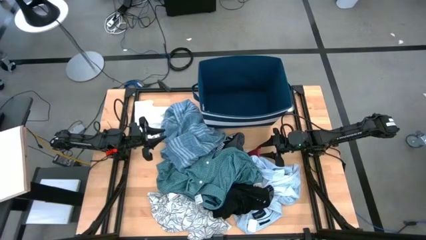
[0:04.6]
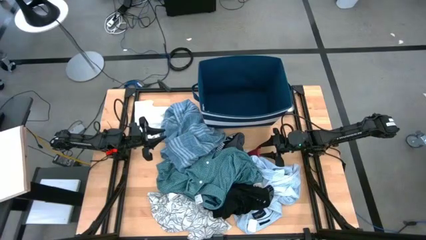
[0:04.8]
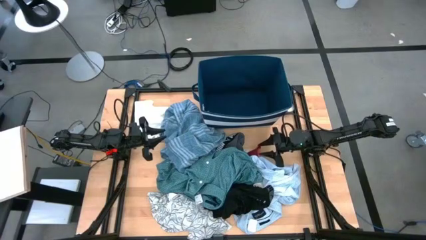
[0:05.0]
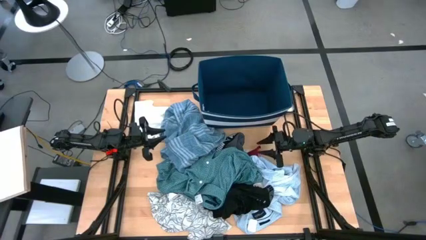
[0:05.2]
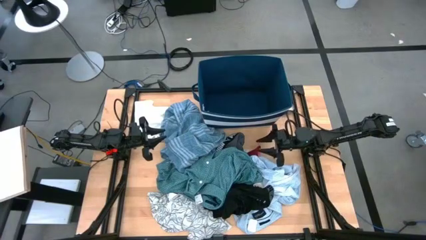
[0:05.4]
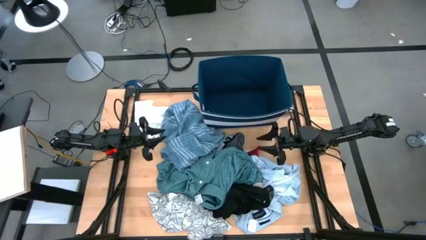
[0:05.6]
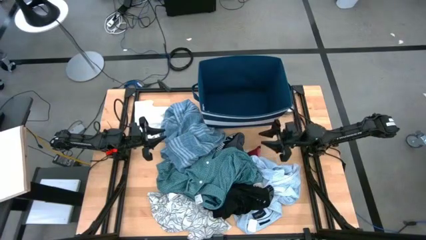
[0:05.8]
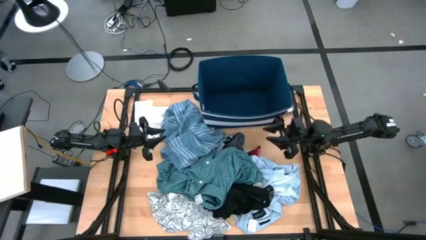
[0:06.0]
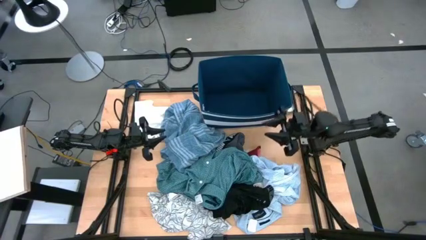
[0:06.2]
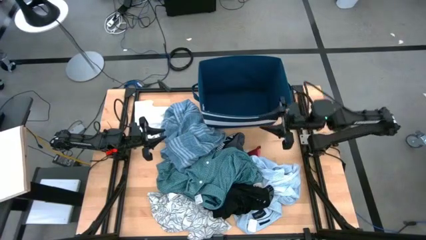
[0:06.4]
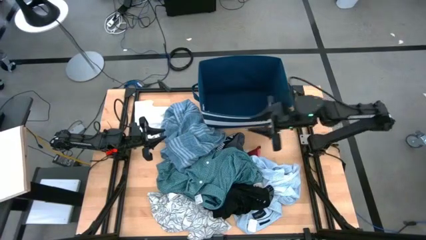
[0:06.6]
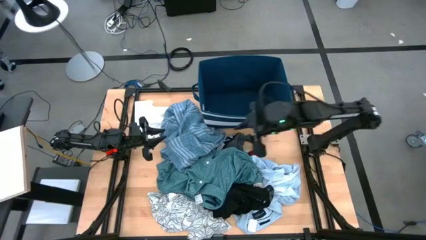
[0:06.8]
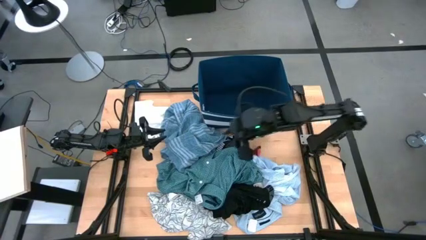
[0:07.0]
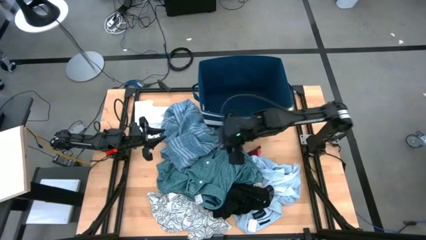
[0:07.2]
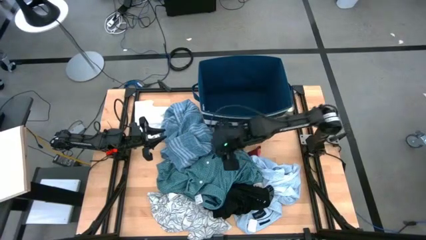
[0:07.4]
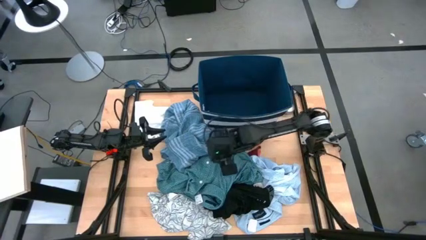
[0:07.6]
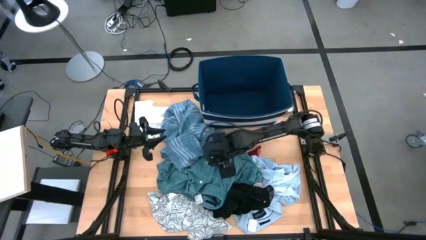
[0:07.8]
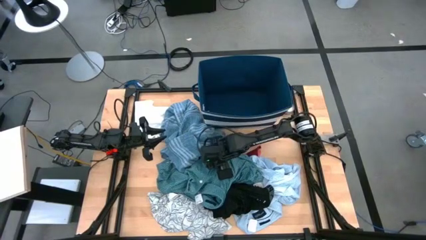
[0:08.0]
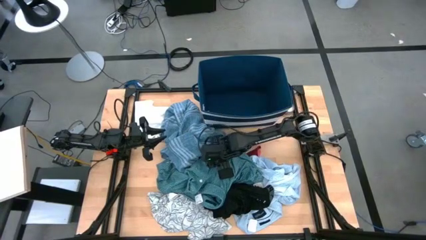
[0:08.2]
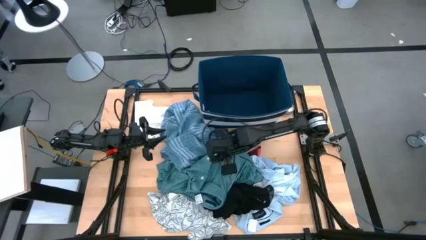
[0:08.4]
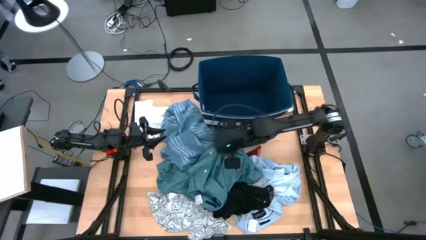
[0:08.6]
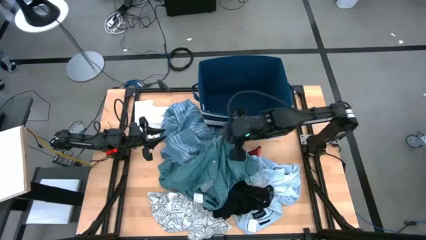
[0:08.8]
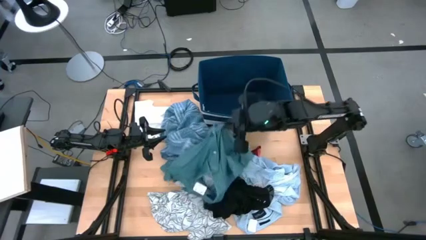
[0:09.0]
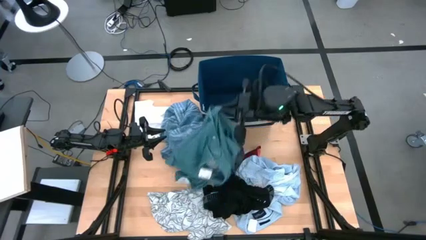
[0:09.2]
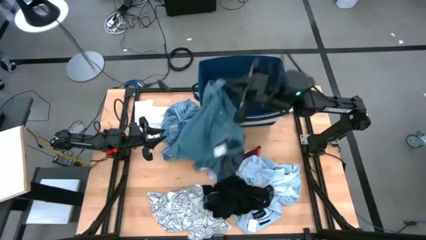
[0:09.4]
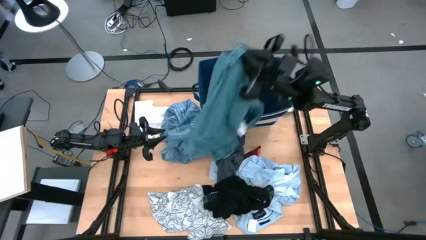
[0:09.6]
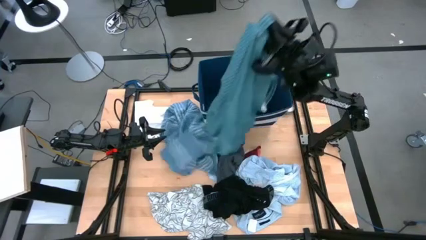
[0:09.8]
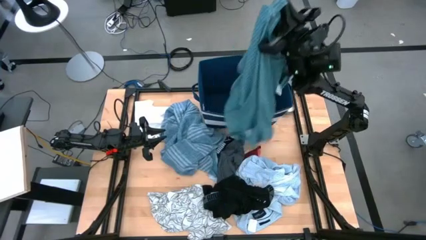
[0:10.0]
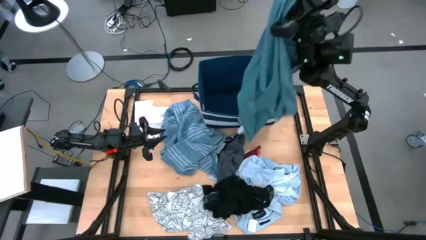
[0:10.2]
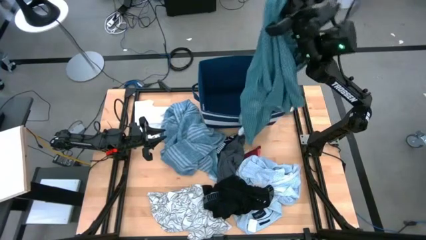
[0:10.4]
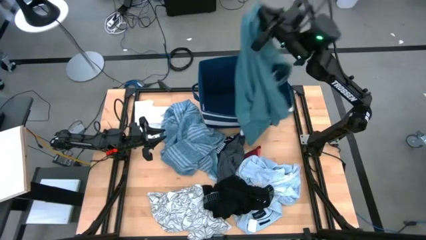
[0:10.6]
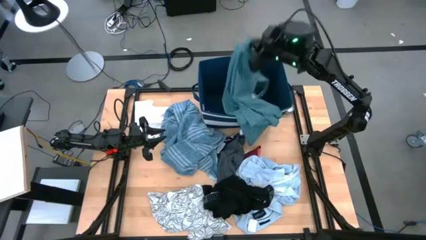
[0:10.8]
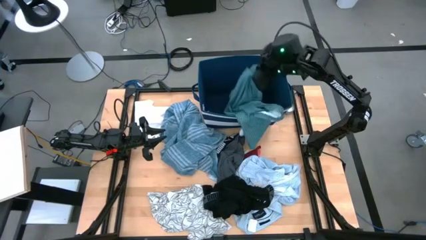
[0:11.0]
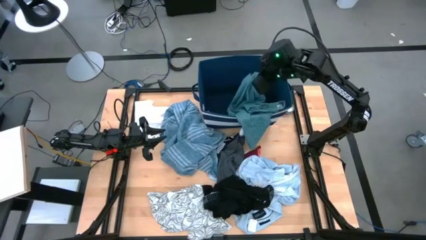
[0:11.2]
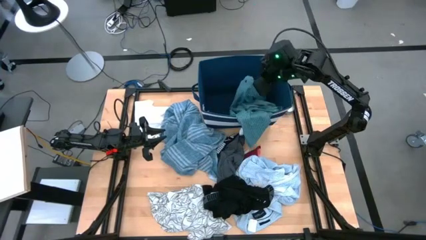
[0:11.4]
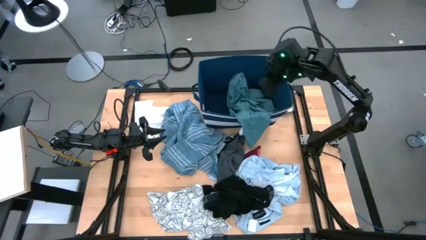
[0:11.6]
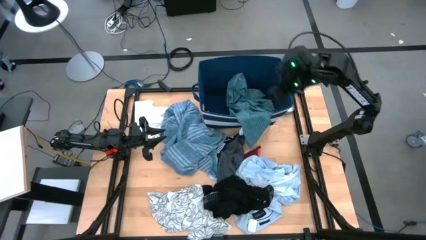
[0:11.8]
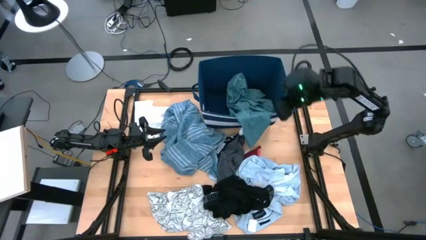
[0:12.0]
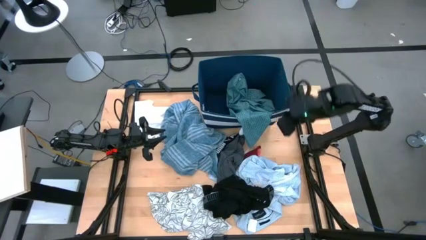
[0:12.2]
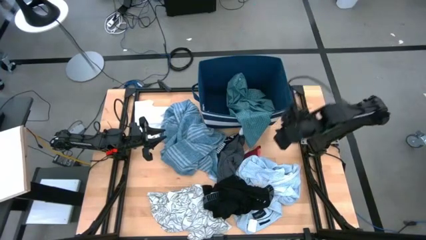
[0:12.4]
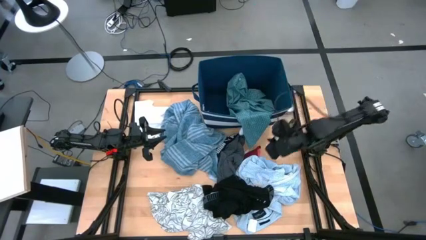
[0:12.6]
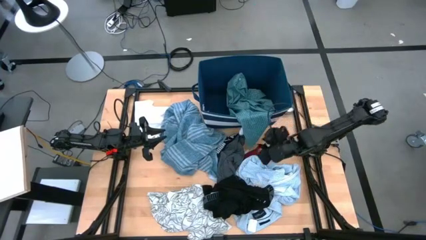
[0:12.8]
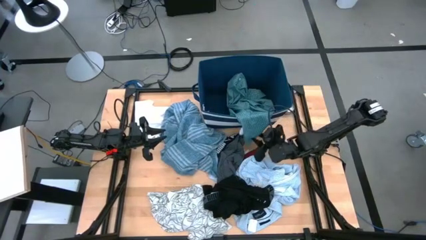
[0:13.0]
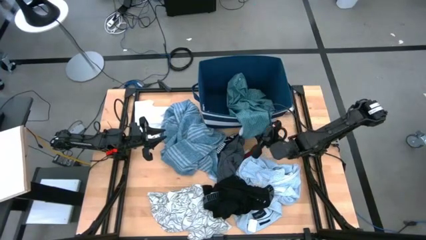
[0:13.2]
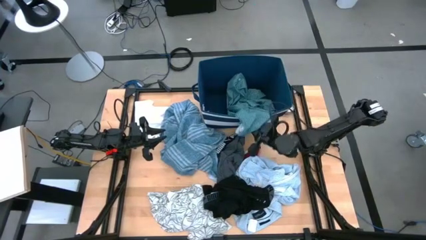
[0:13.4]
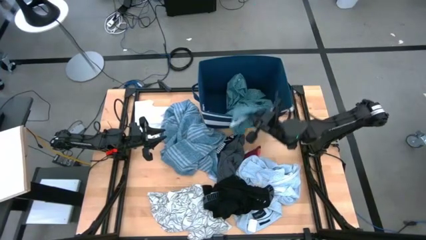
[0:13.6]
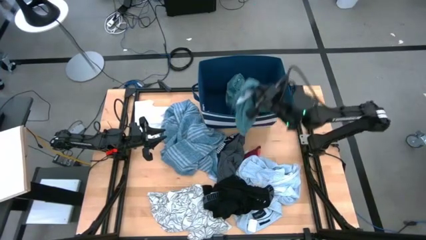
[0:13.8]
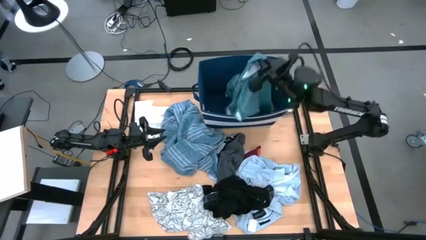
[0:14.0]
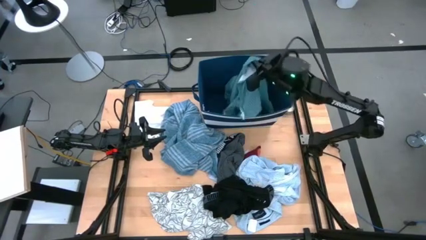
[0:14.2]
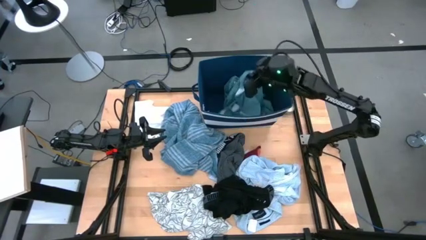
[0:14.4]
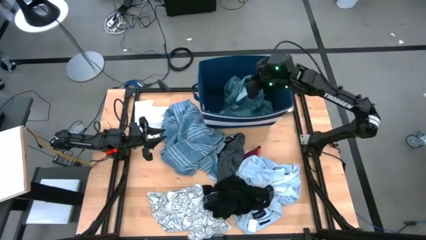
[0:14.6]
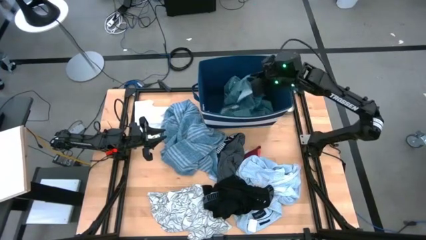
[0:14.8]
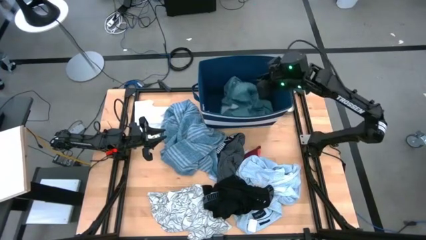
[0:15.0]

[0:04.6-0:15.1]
Task: Sort clothes
Put the green polo shirt into the blue bin
